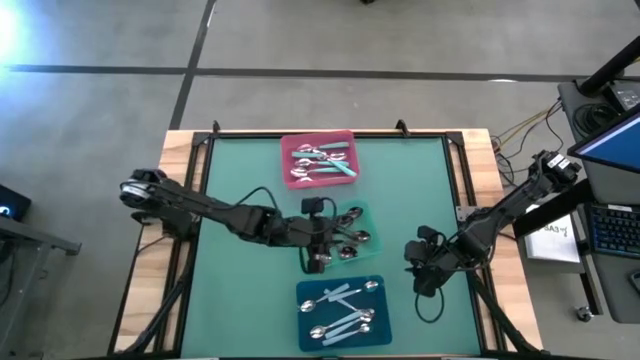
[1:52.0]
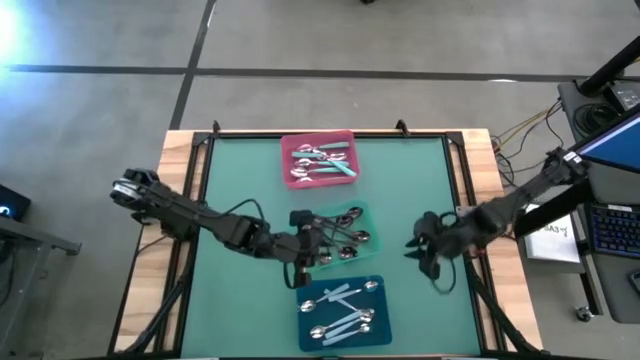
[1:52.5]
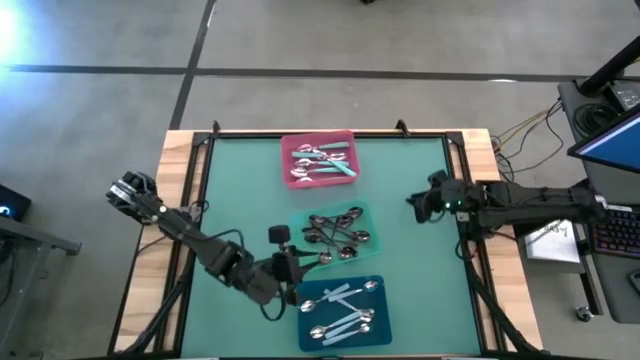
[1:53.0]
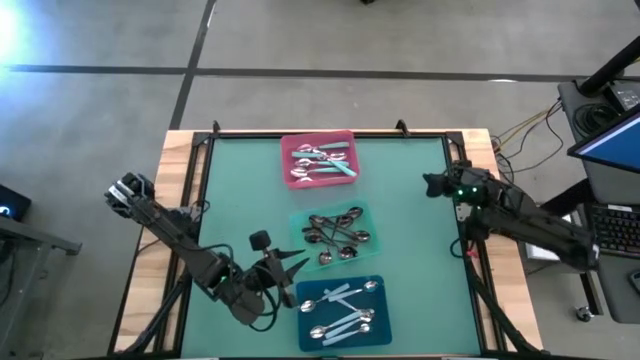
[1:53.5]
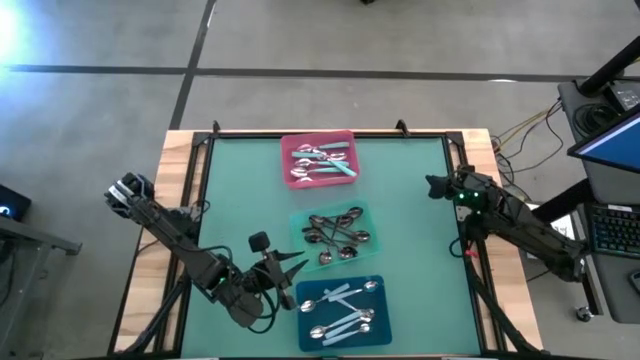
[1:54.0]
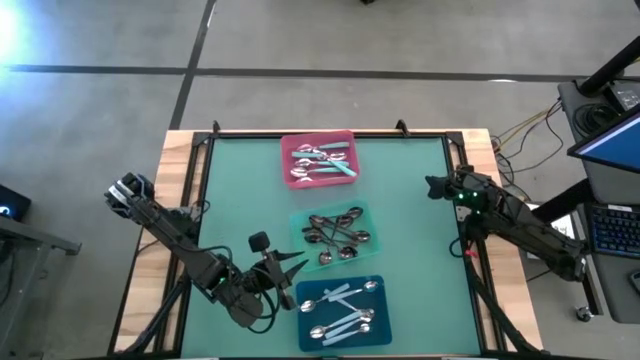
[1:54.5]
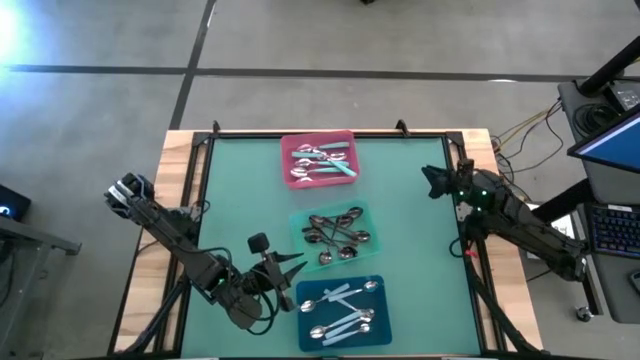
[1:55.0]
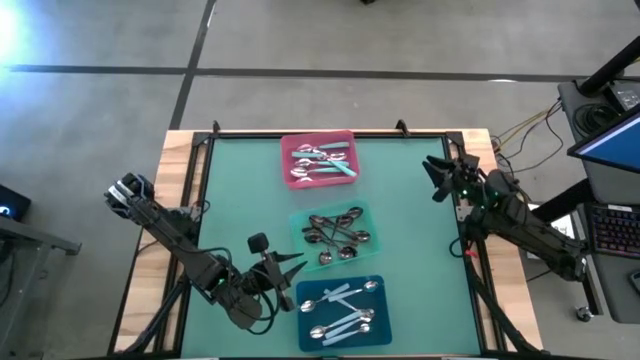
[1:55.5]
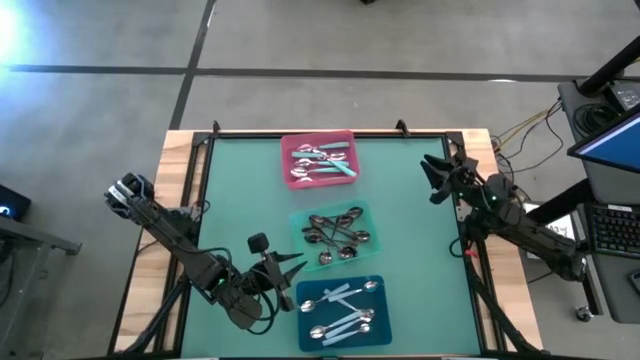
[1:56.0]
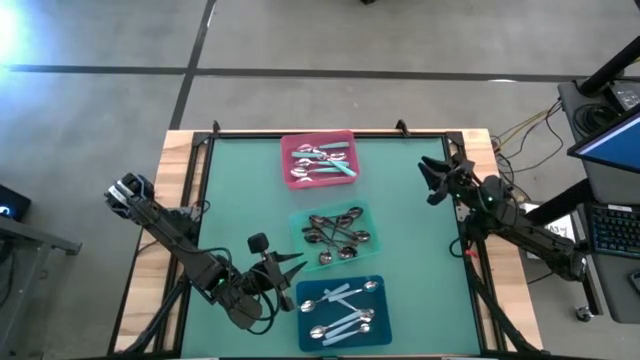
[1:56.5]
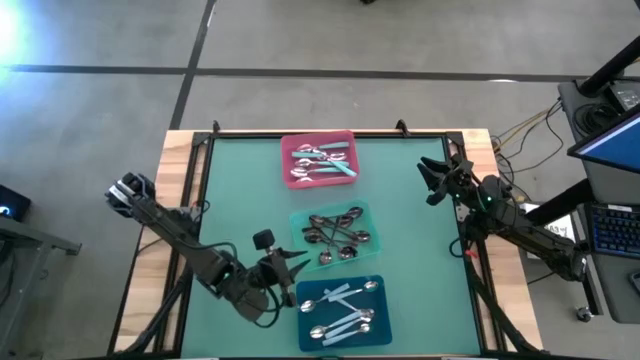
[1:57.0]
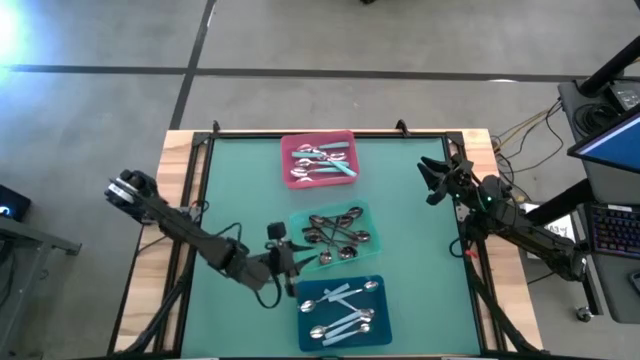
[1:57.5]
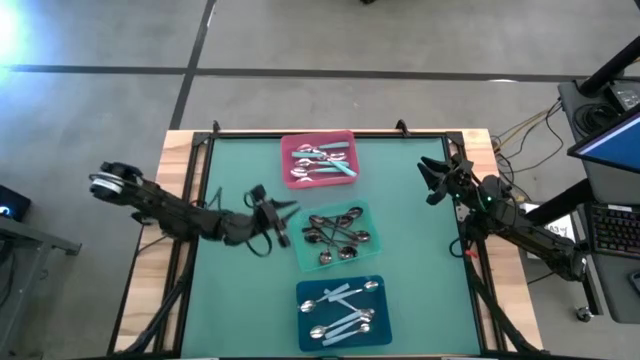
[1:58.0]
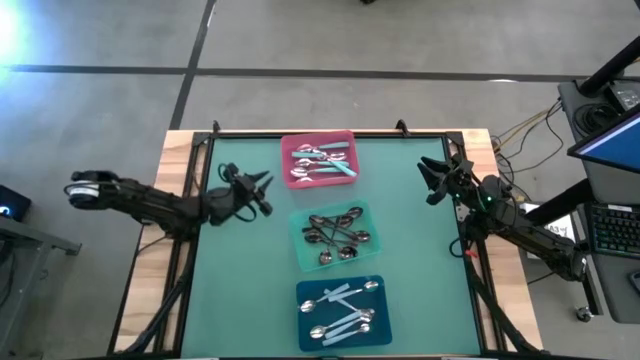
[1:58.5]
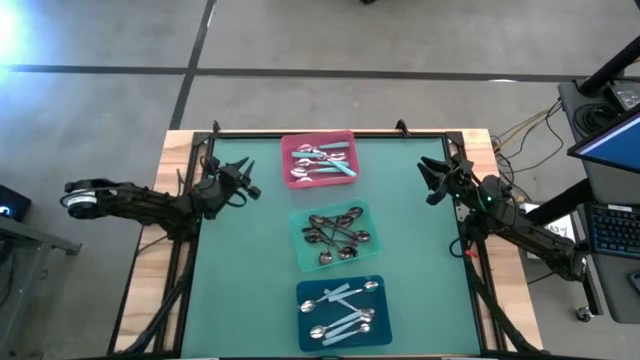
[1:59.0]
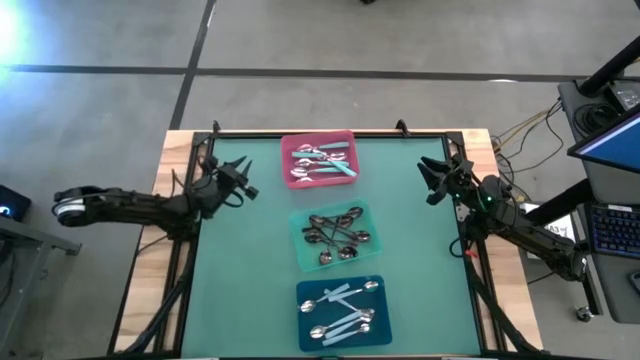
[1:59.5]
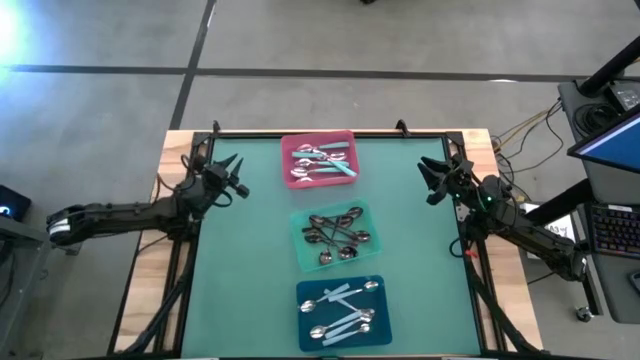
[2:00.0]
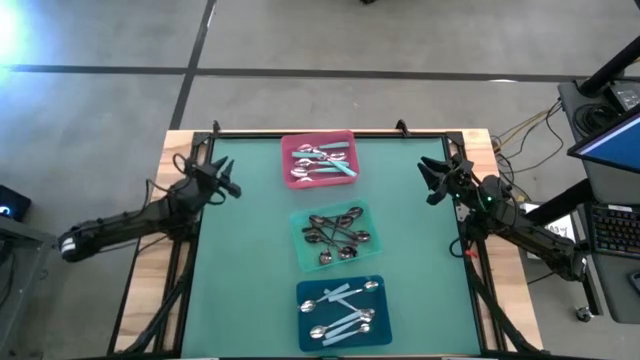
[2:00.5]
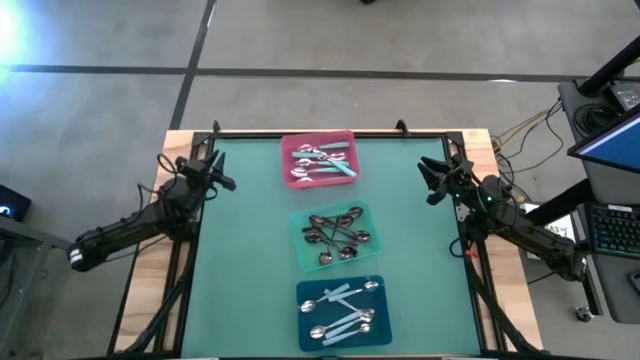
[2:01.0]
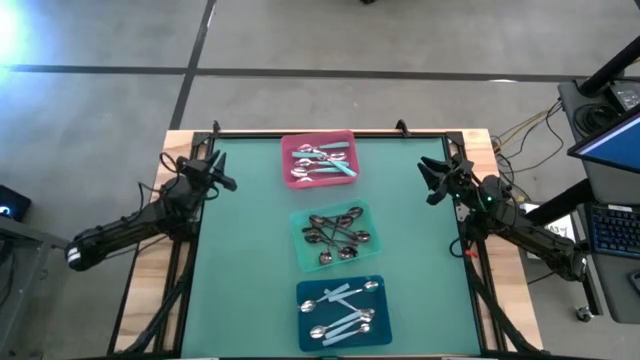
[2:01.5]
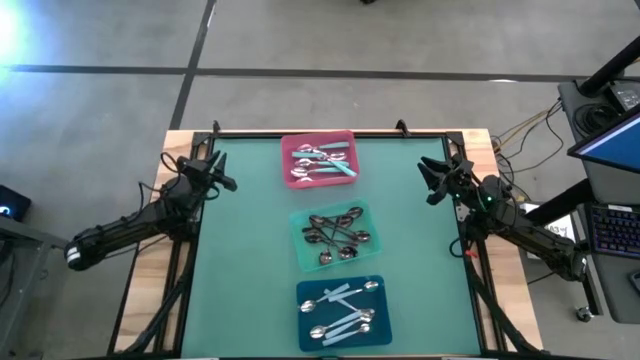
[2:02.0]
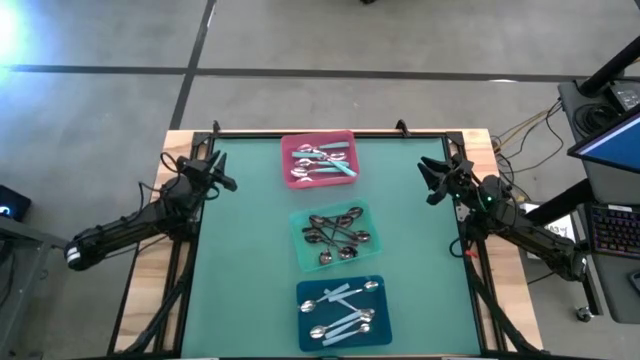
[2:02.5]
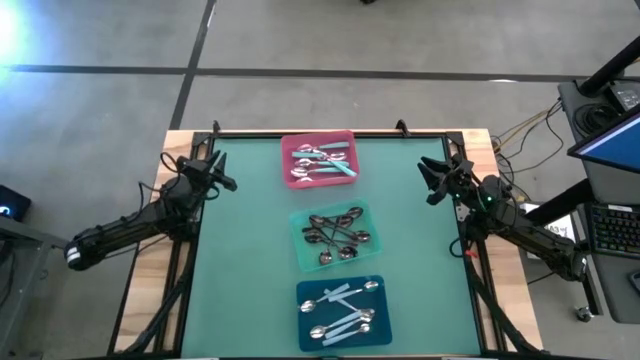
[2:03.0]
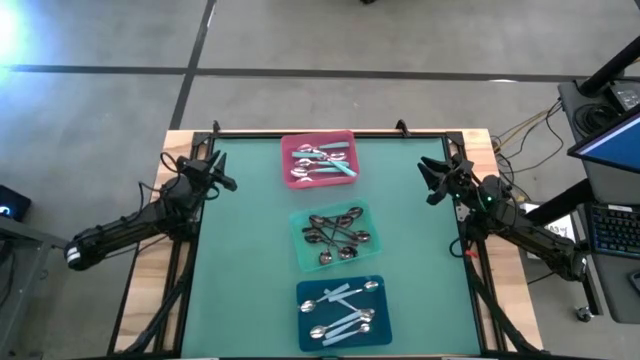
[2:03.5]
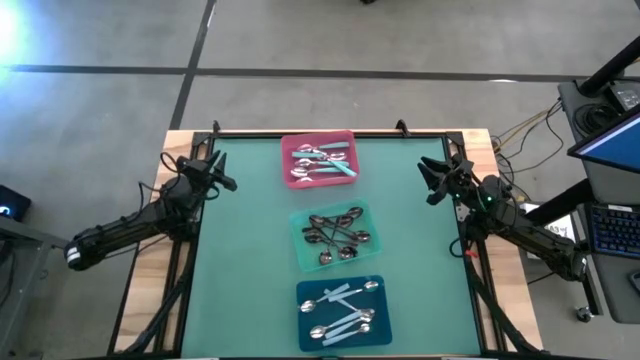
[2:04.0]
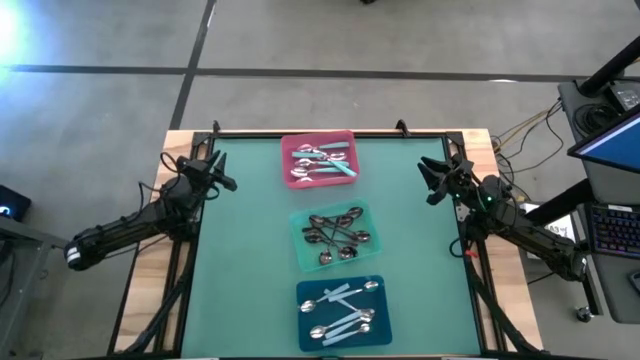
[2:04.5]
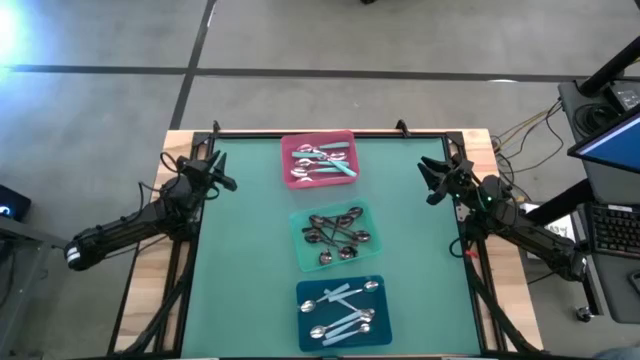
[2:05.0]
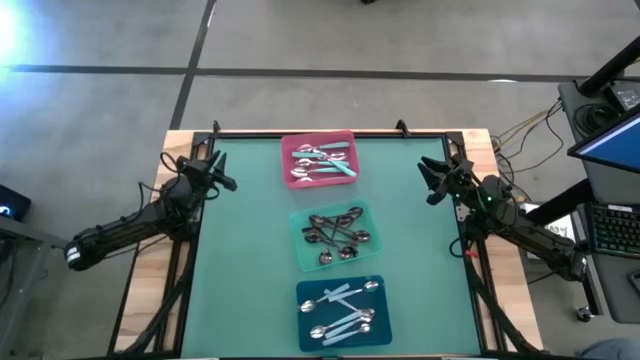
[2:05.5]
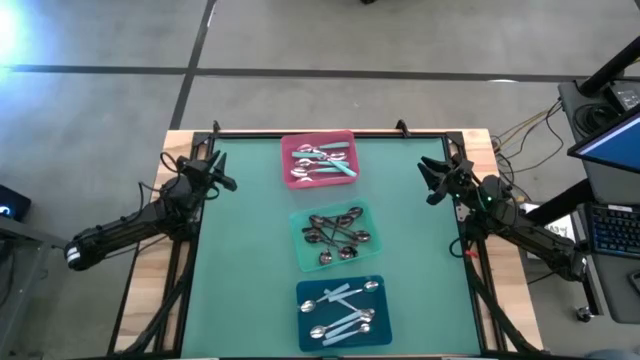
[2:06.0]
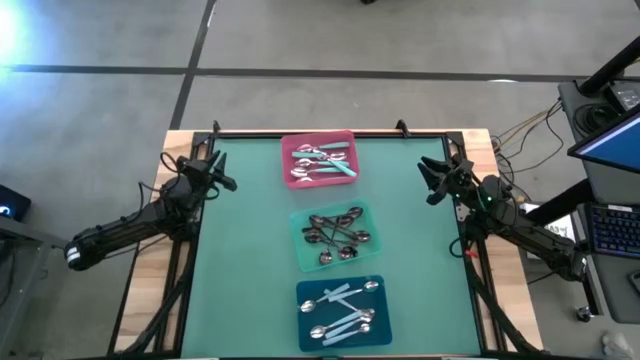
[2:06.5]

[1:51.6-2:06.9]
Task: Sort silverware by color (type)
Return to Home Position

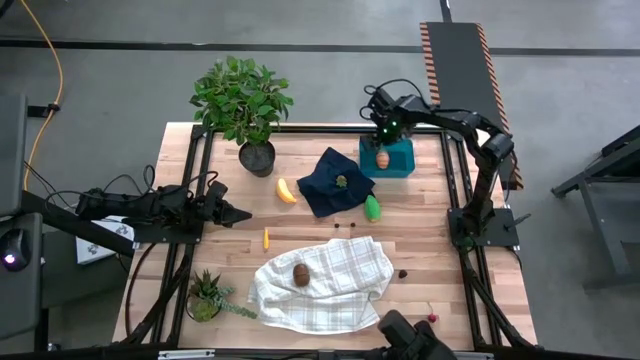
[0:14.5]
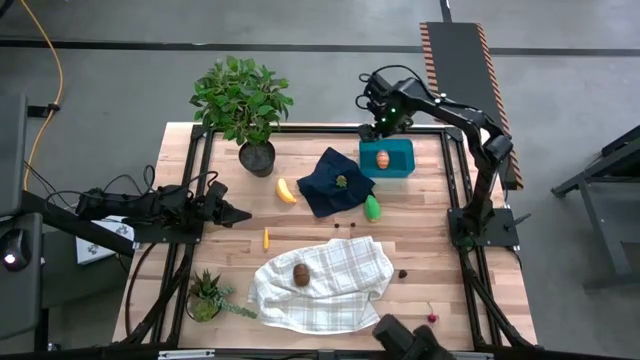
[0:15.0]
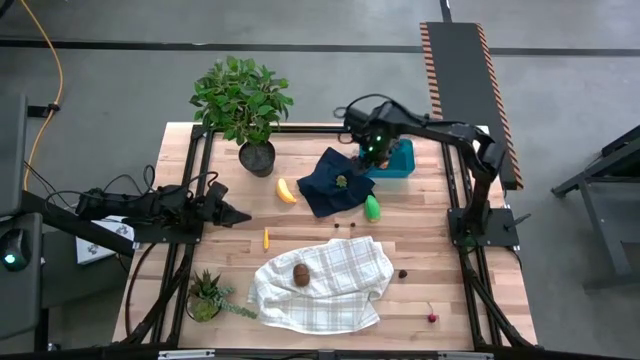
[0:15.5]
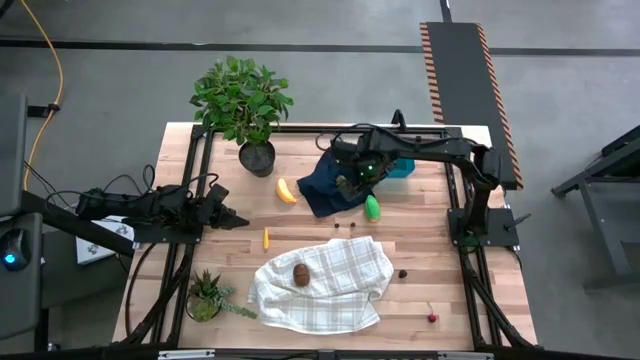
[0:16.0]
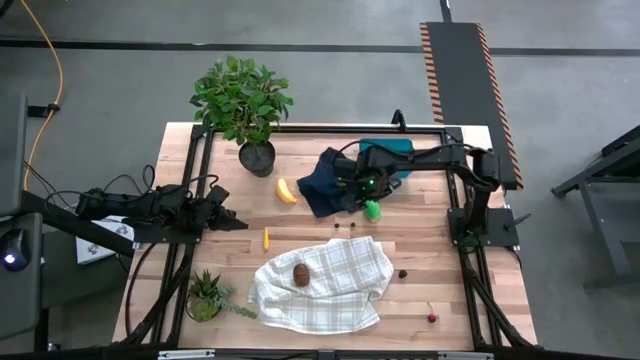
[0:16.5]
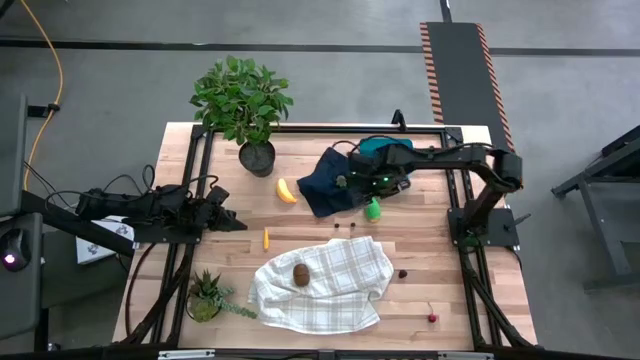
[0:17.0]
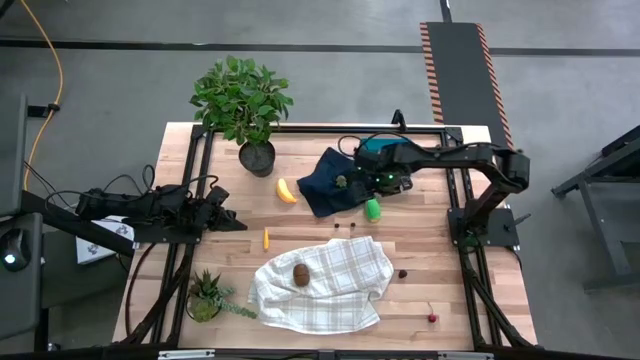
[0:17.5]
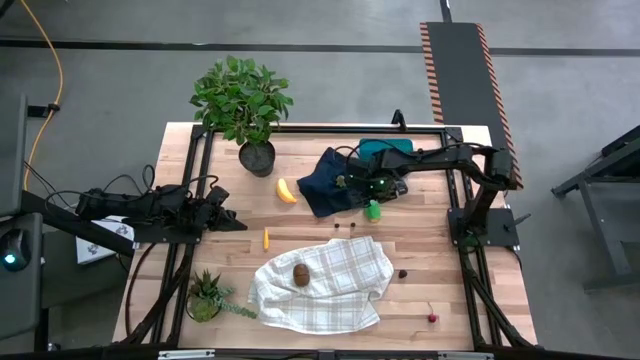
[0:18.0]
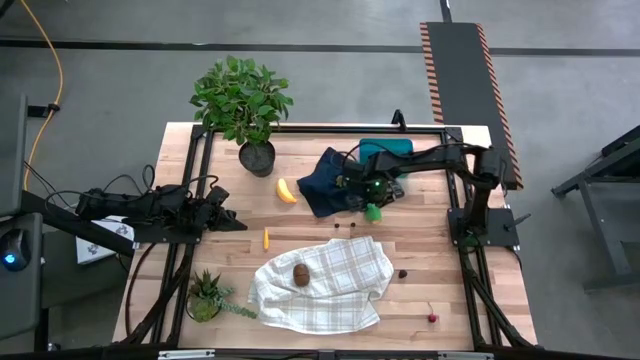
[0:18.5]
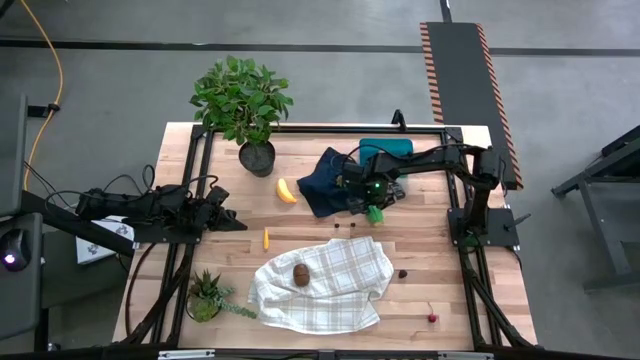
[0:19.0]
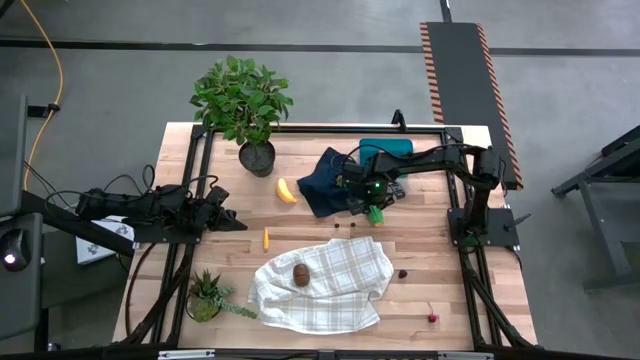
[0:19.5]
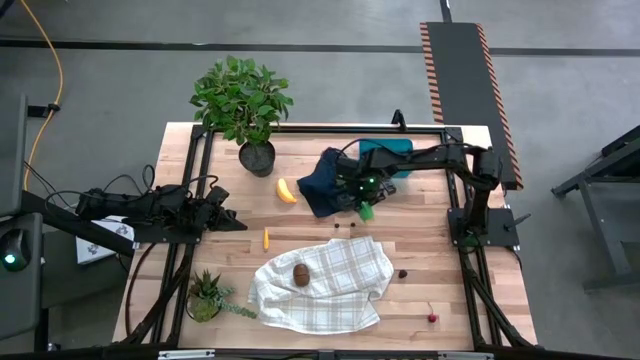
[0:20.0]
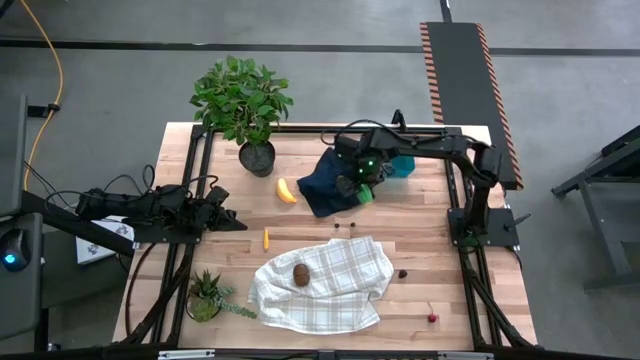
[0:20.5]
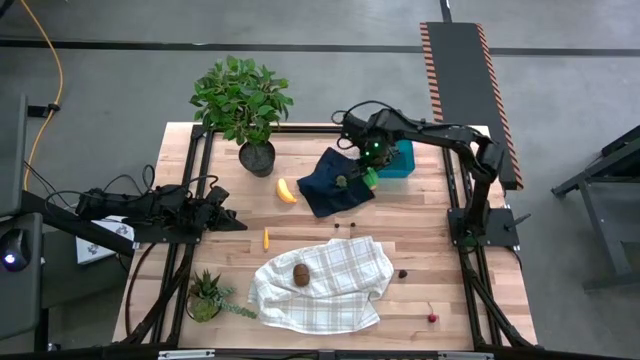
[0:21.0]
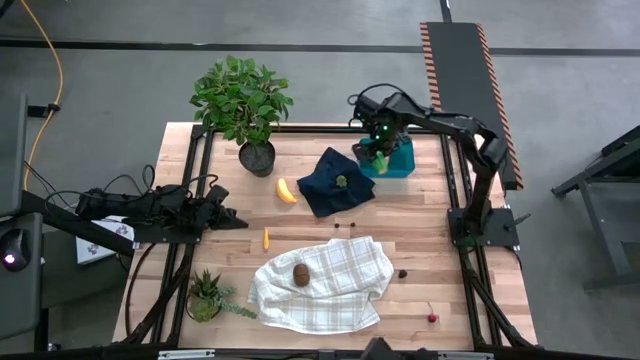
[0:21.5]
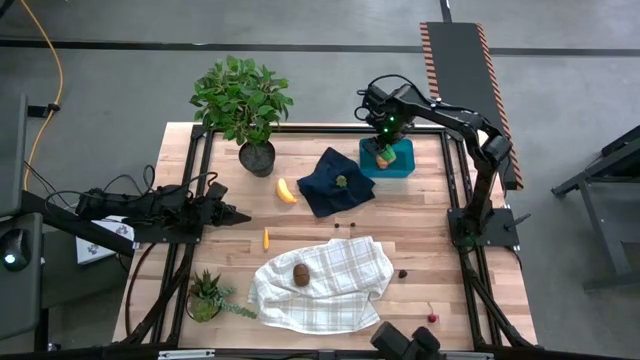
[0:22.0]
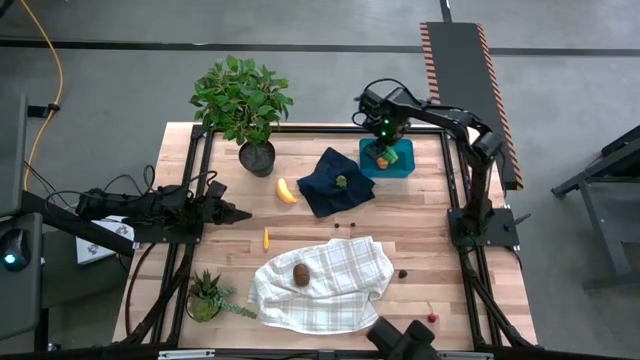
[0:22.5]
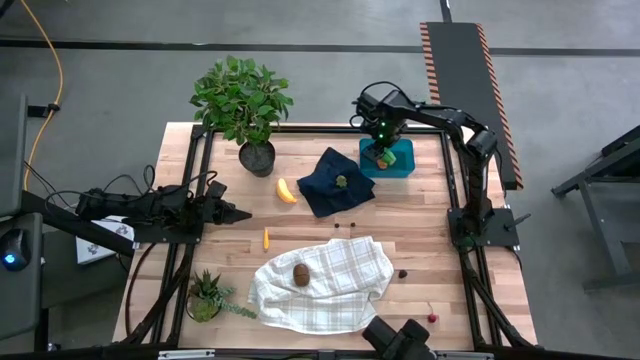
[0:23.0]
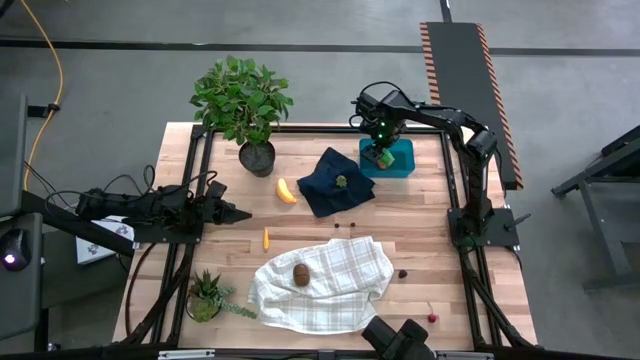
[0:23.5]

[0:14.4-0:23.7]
Task: Pick and placing Produce into tupperware
Put the green corn into the blue bin
